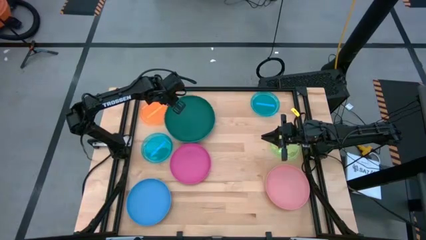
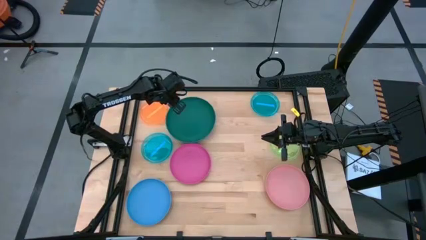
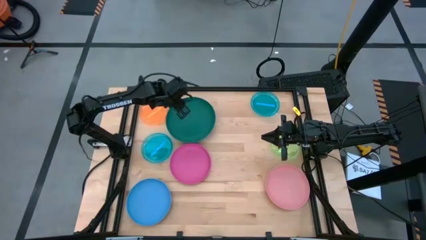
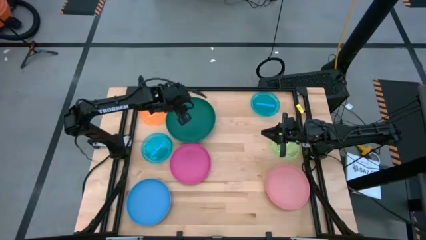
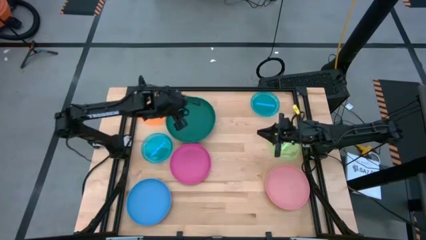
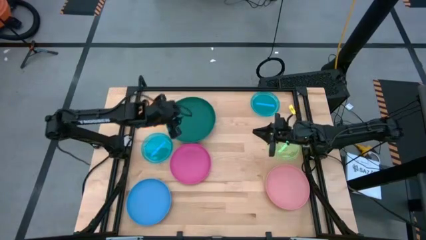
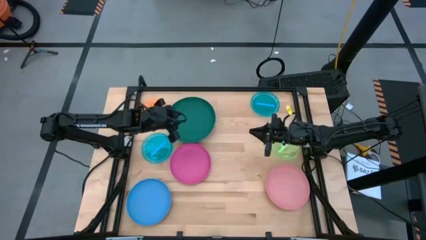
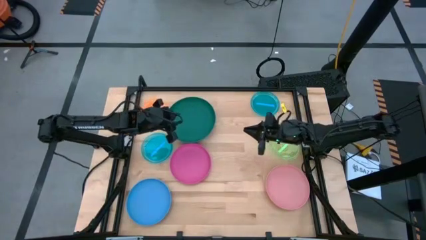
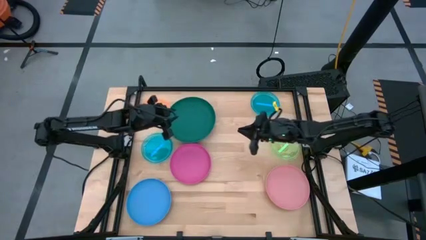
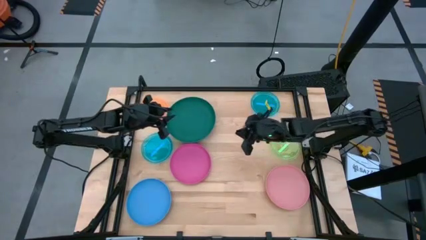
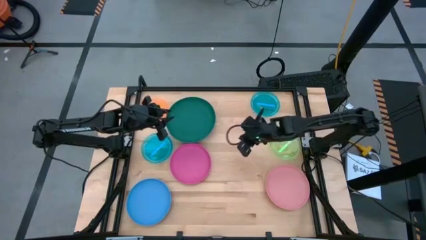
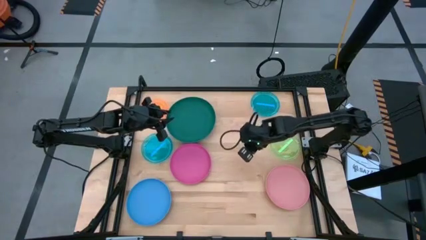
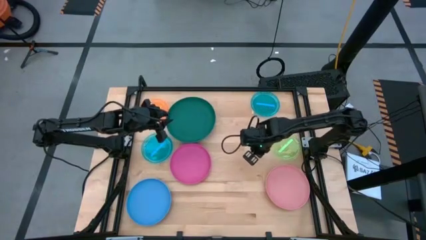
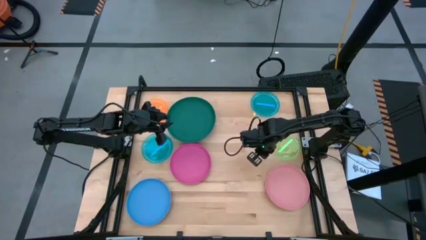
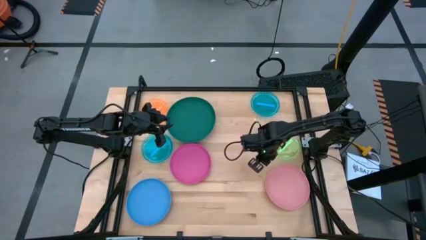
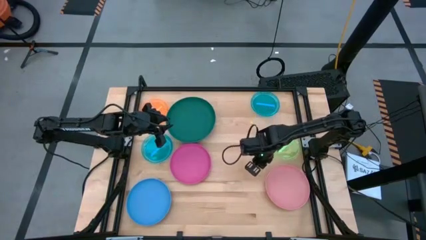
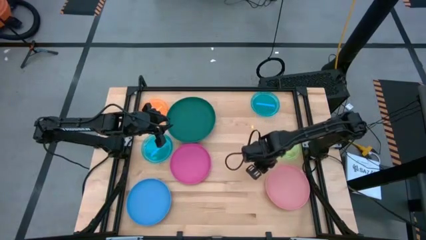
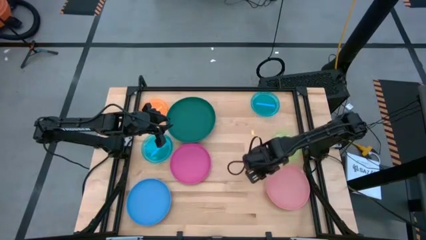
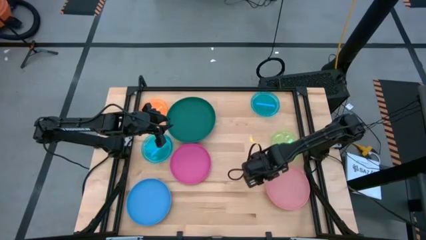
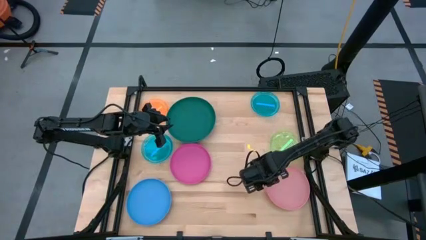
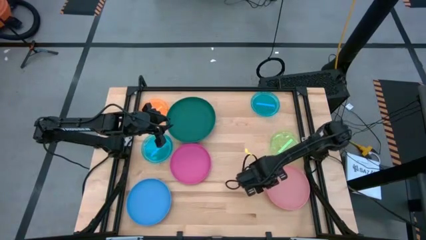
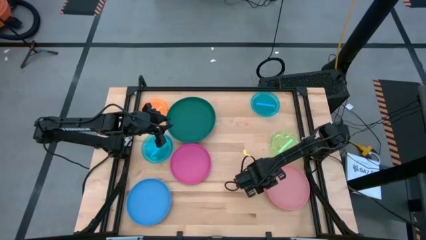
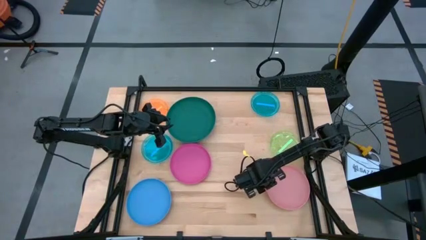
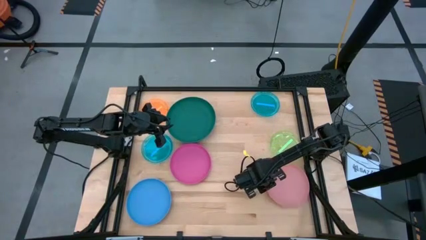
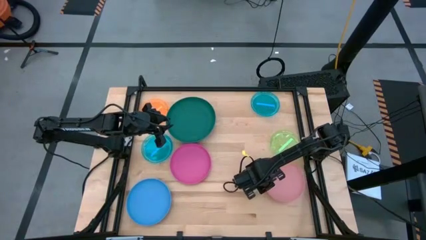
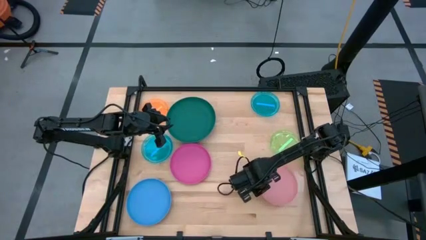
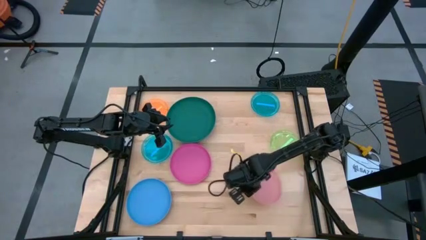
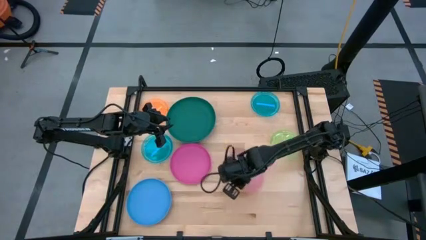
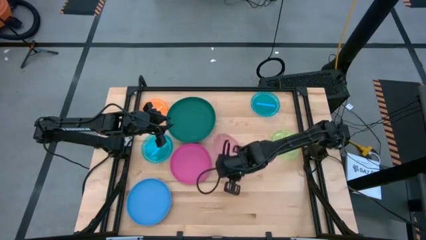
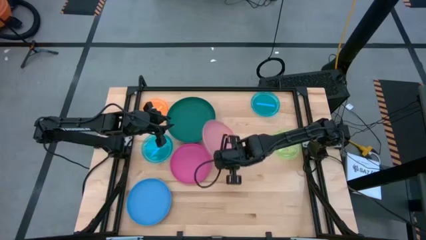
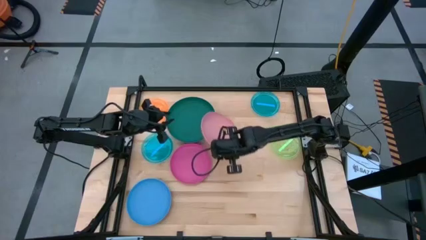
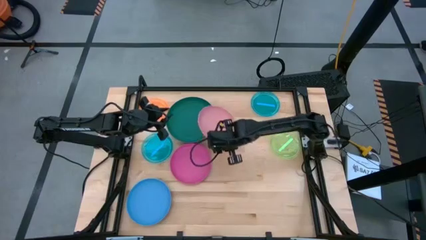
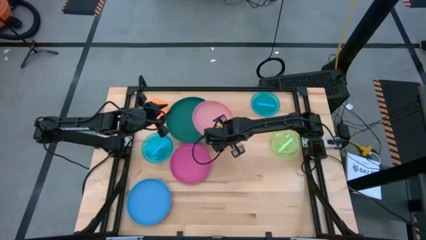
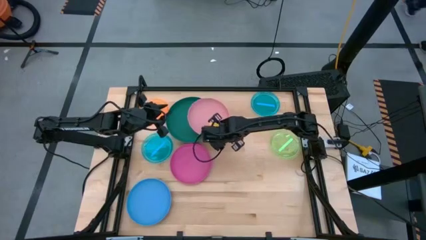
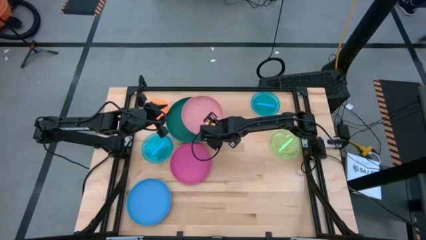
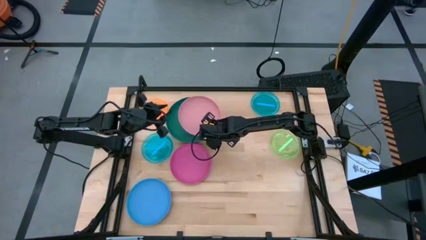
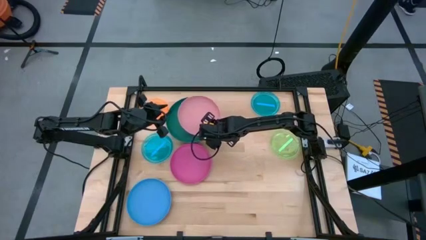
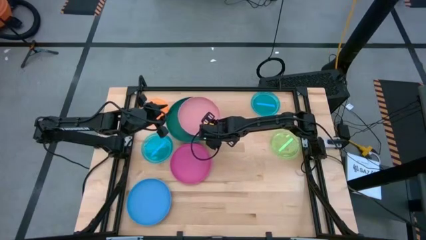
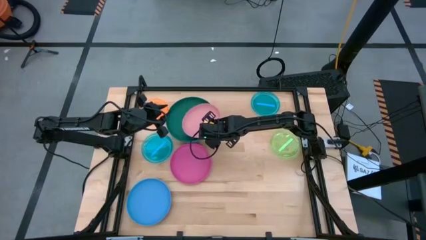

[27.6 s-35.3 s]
Task: Stack plastic plates
Stack the medium light pink plate on top of the big green plate

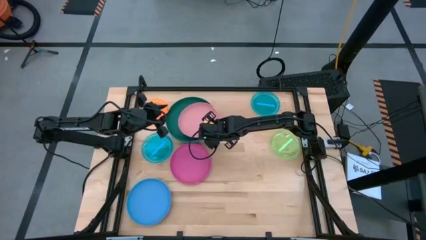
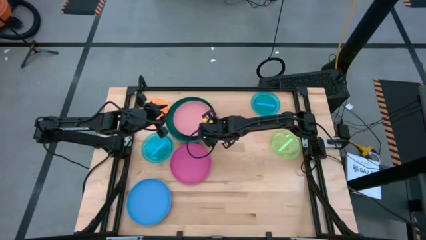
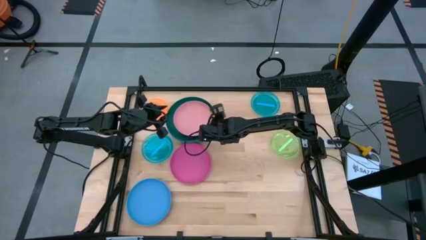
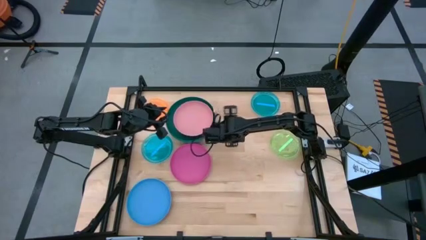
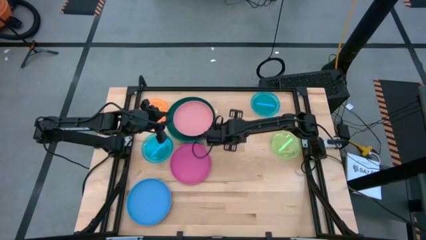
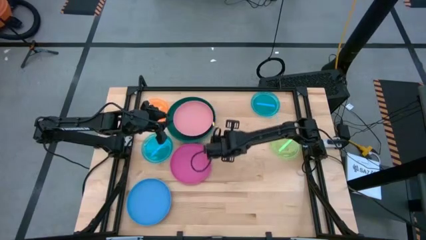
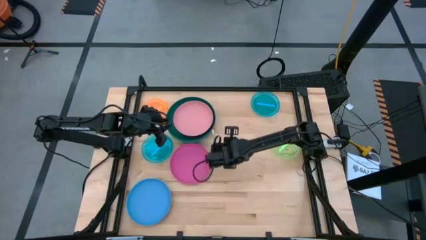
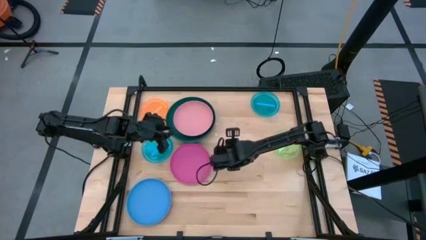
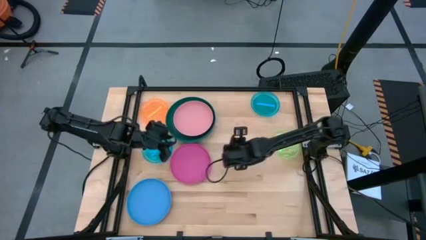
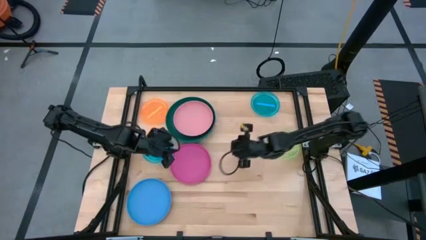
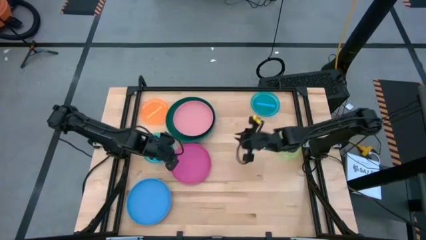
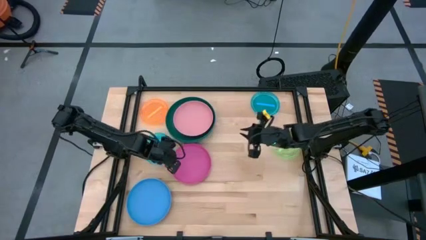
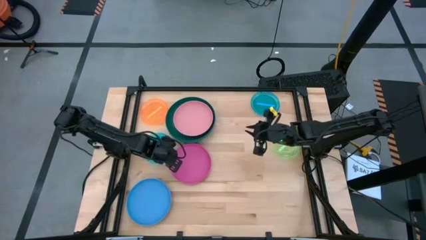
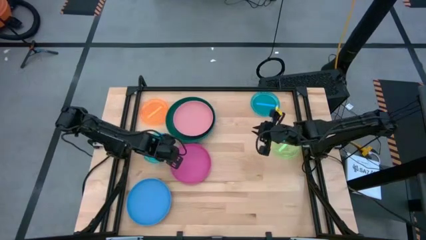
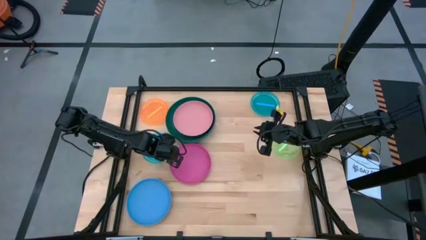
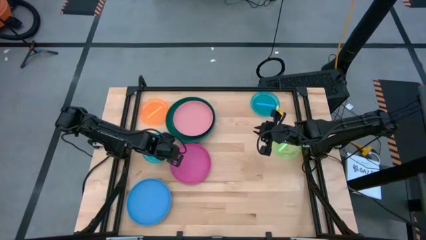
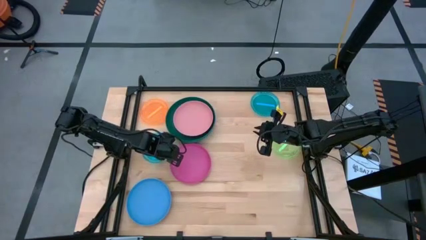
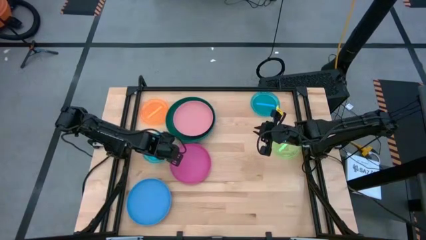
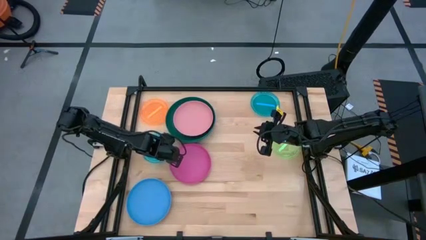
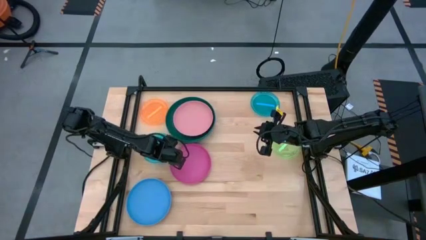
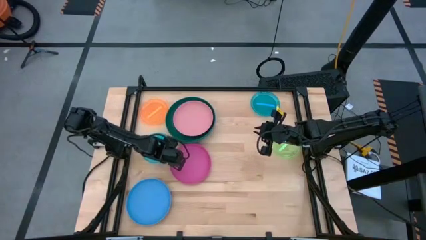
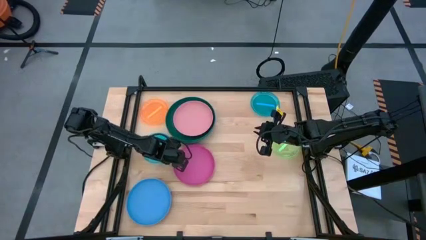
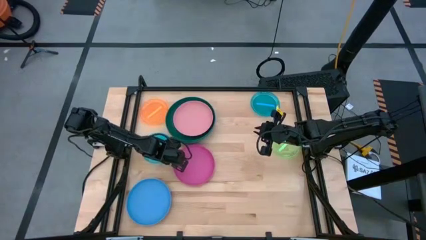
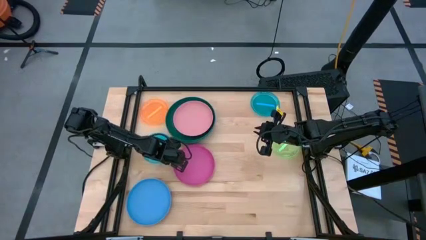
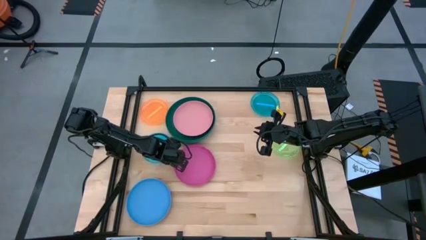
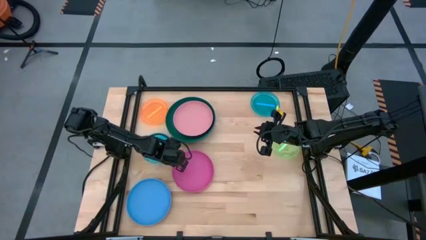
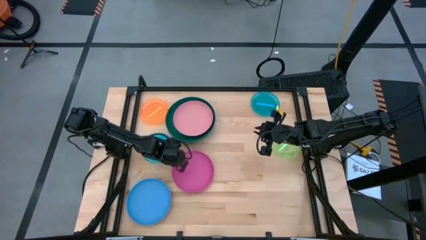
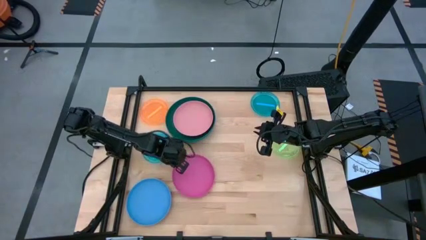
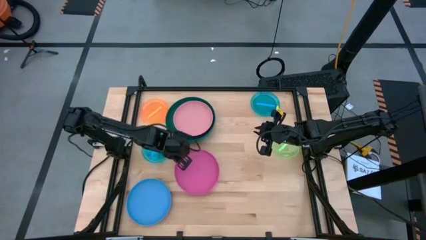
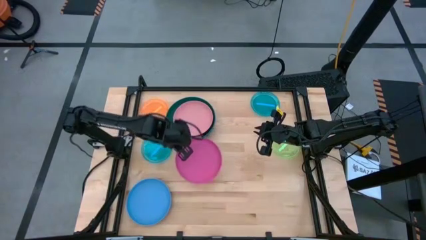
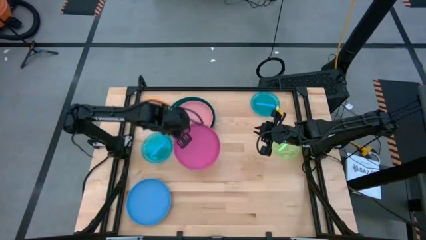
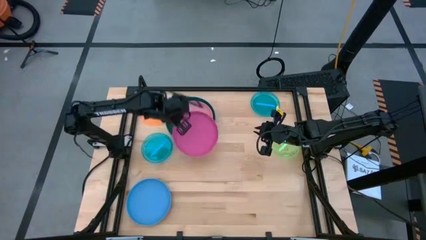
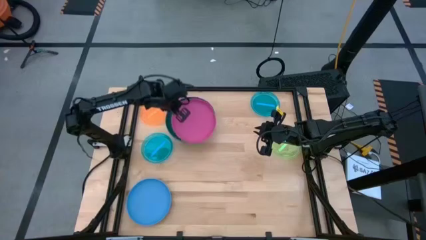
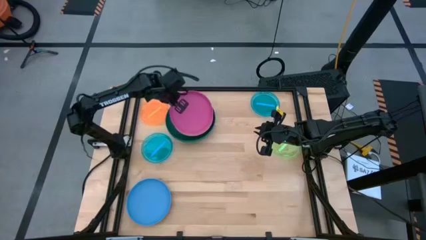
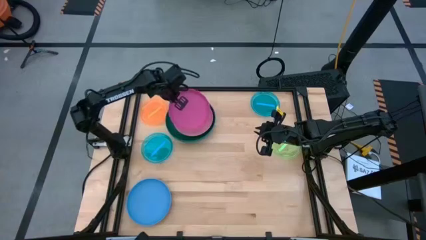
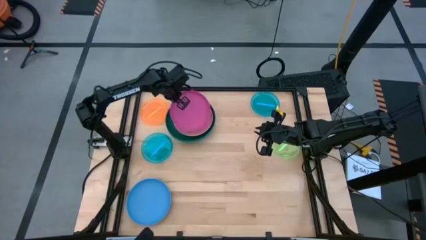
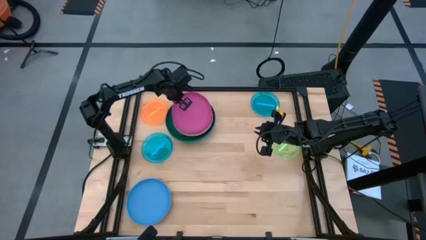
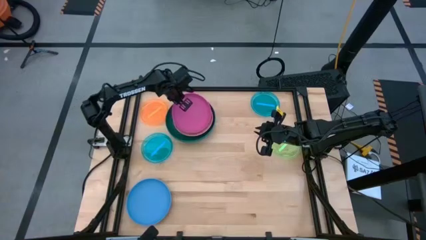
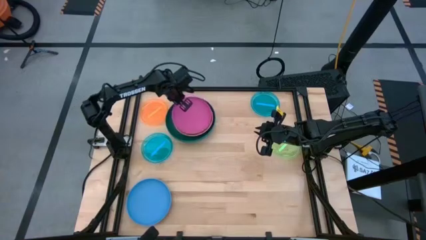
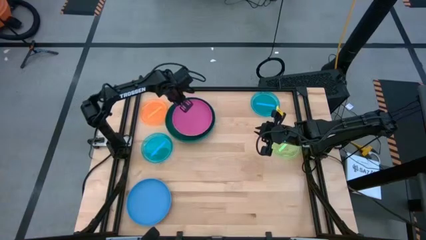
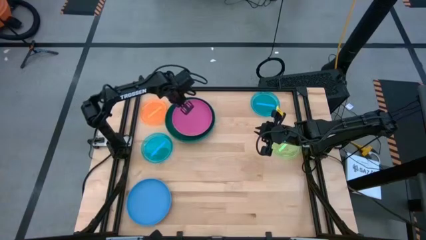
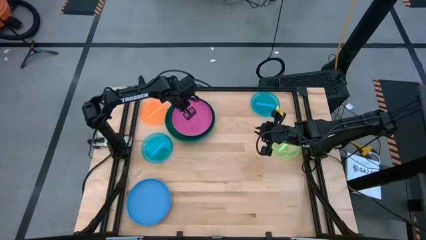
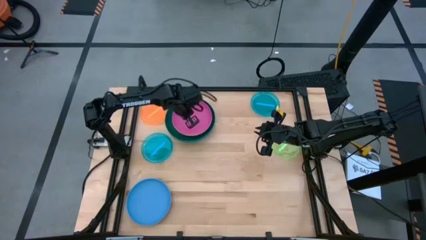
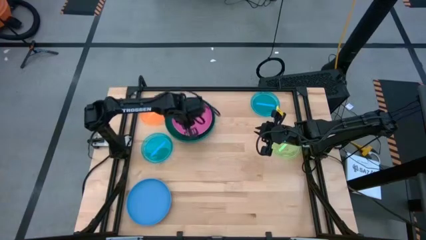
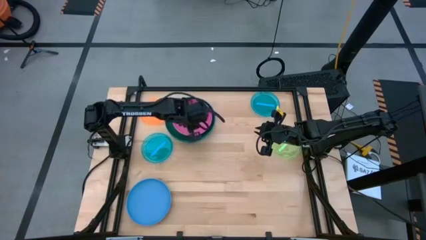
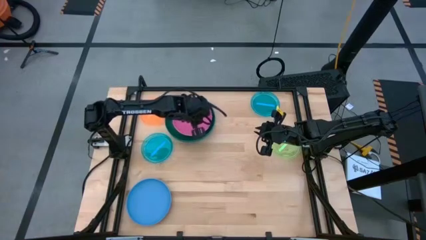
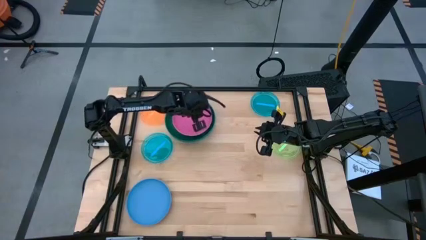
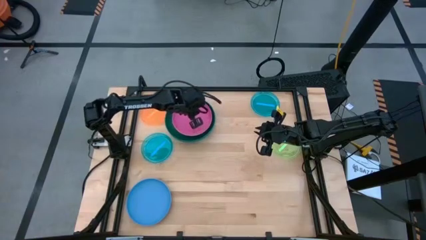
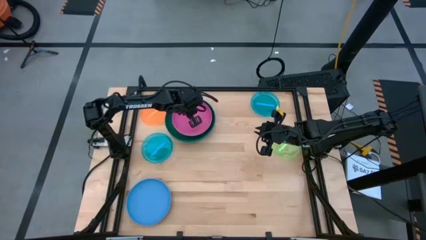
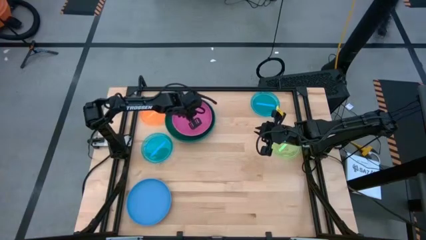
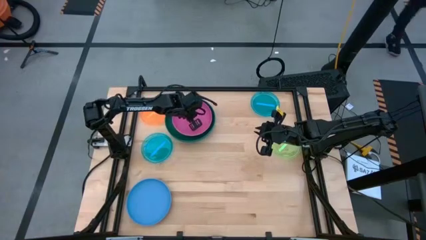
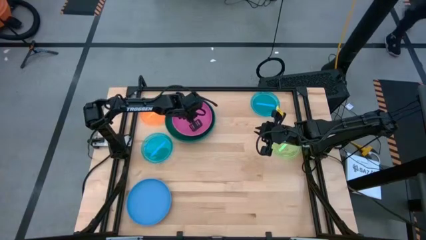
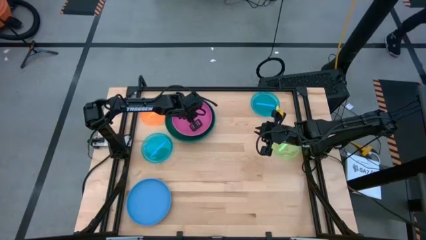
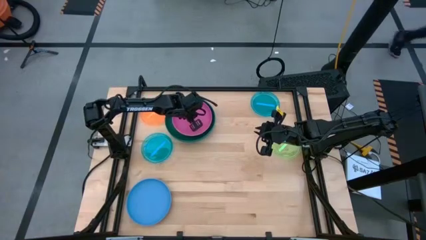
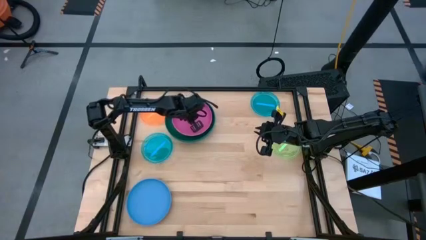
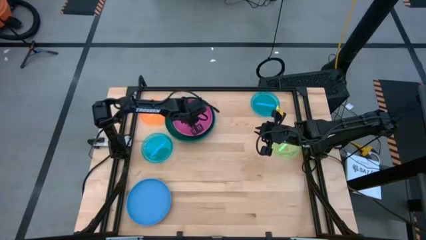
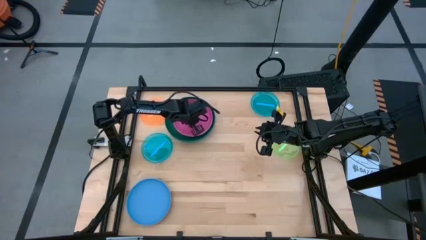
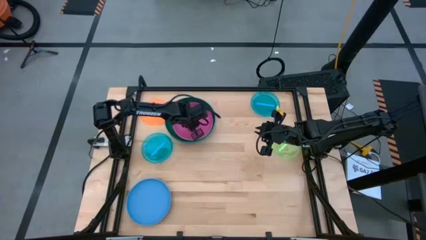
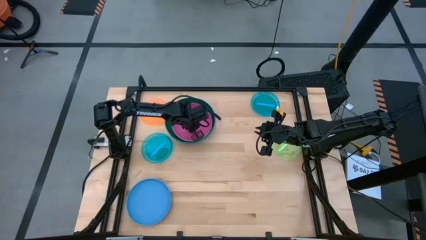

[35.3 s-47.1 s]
Stack the medium pink plate on top of the medium light pink plate
